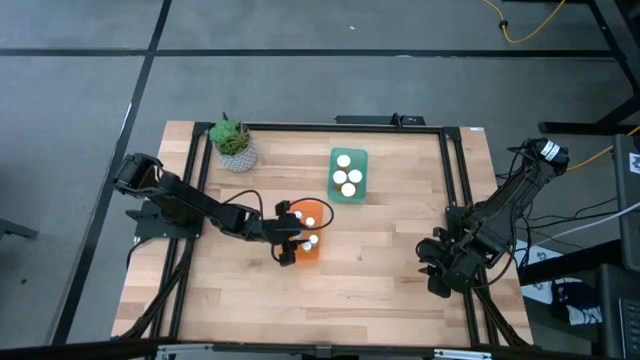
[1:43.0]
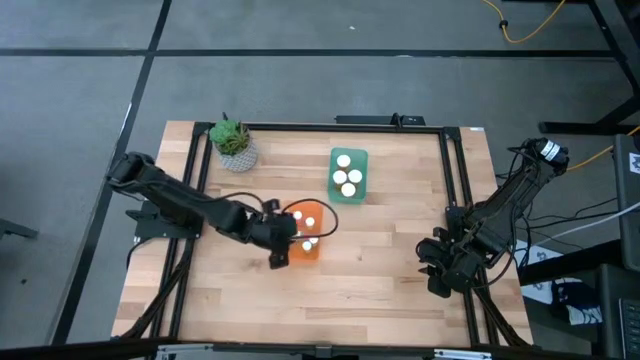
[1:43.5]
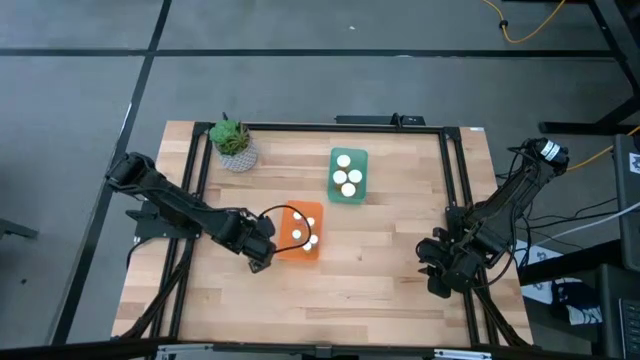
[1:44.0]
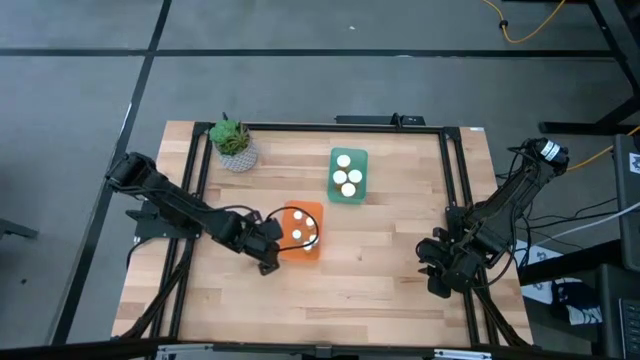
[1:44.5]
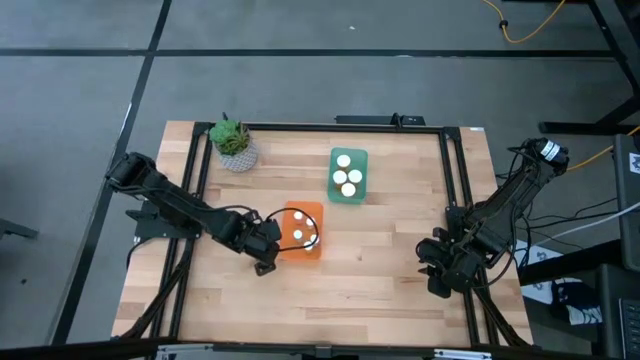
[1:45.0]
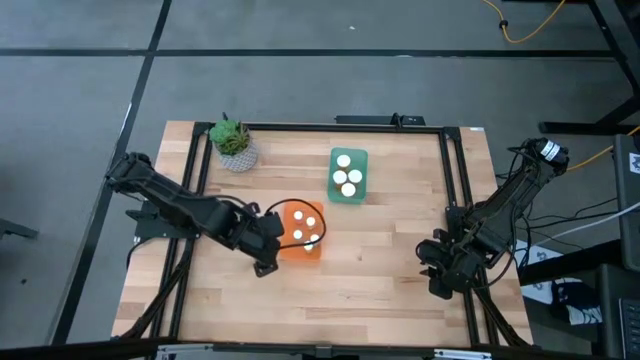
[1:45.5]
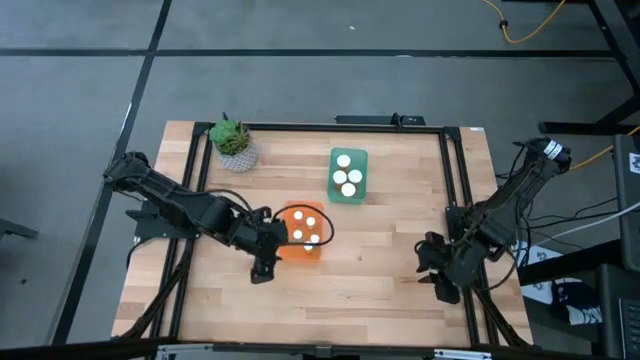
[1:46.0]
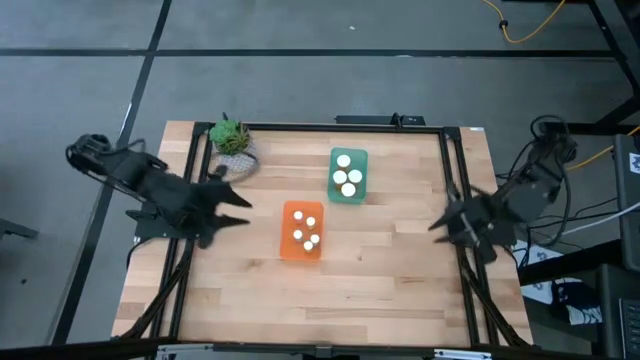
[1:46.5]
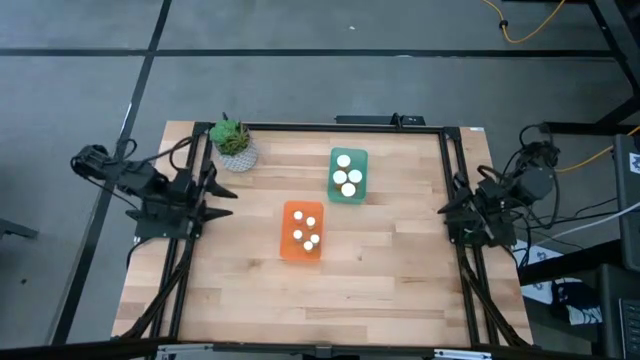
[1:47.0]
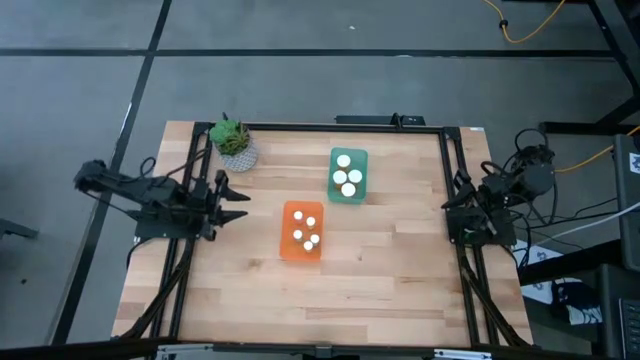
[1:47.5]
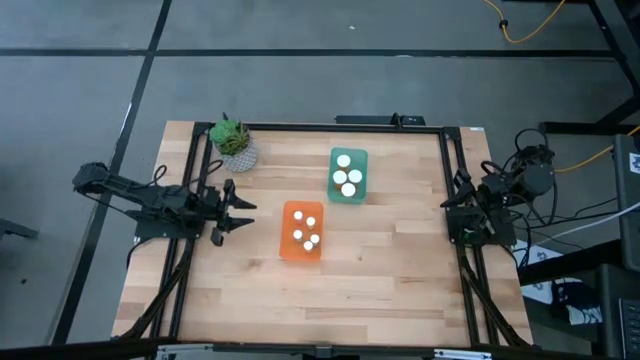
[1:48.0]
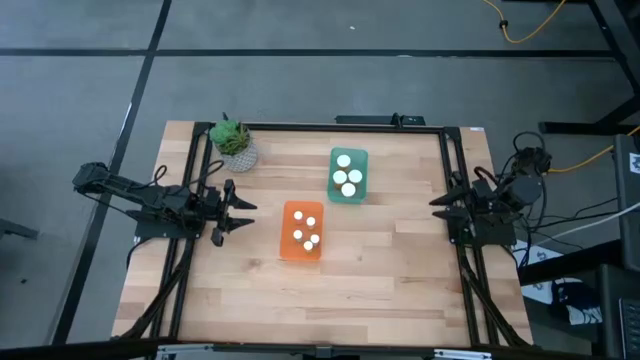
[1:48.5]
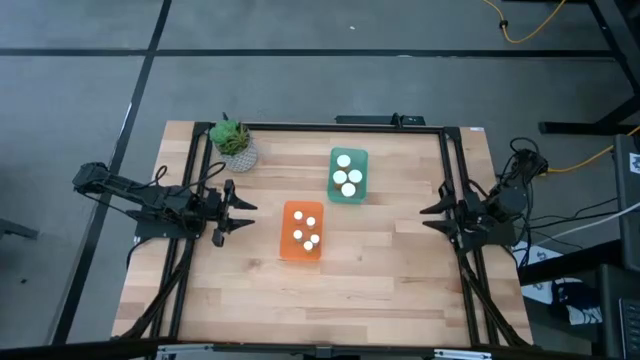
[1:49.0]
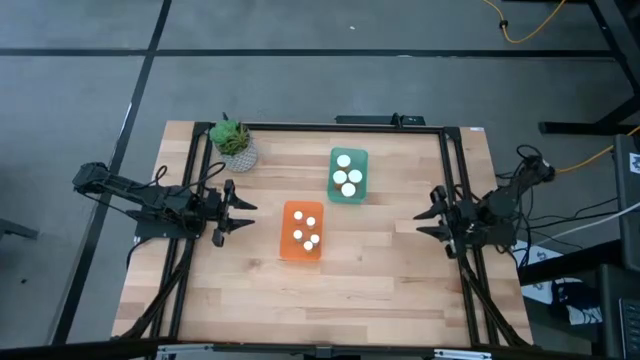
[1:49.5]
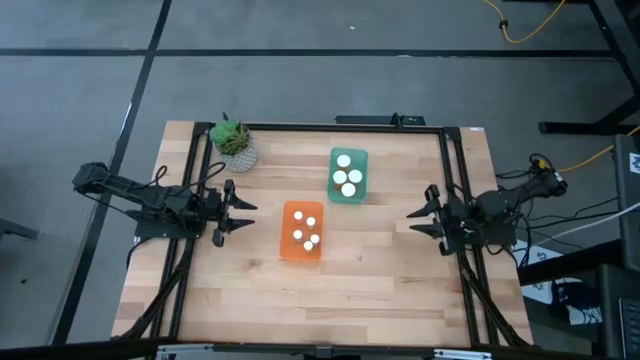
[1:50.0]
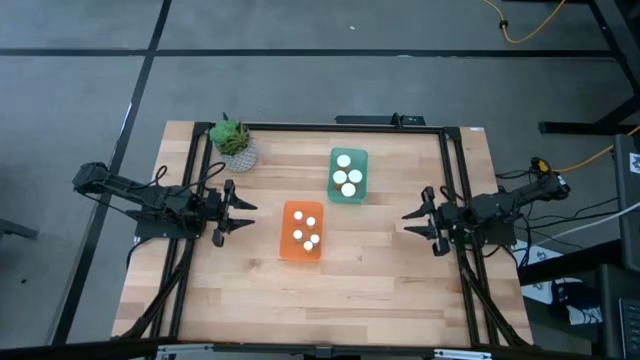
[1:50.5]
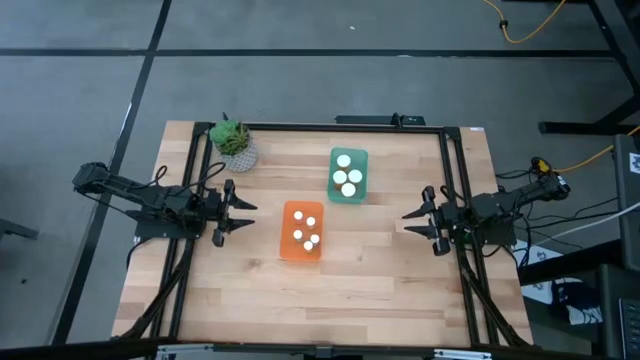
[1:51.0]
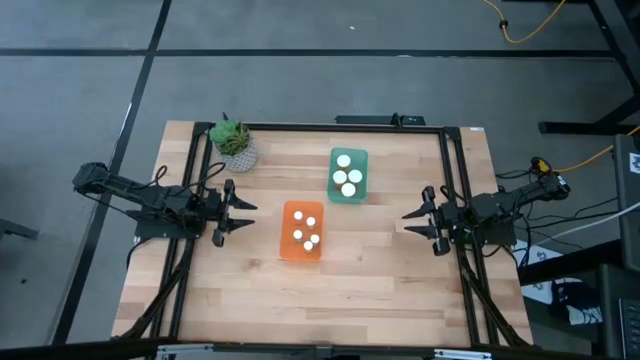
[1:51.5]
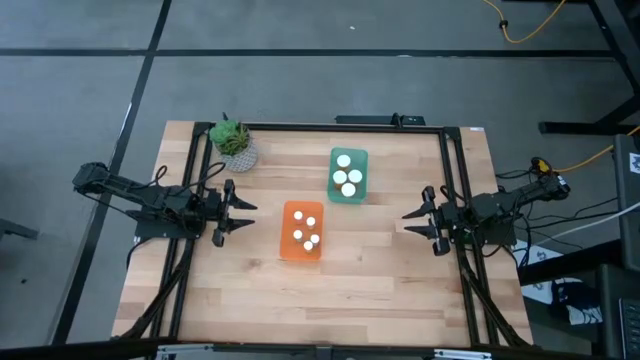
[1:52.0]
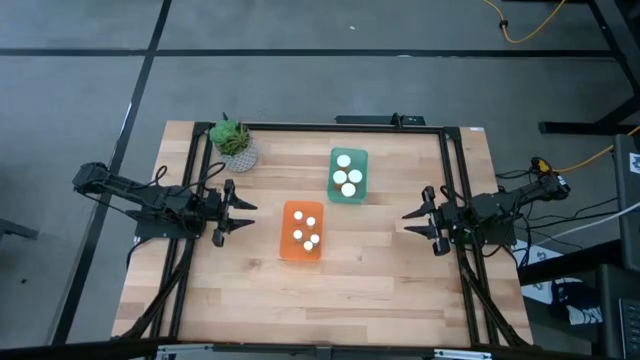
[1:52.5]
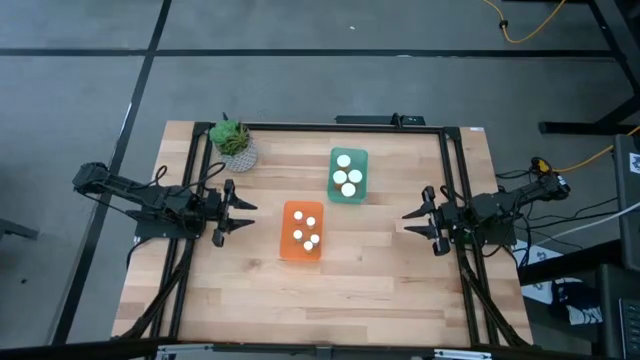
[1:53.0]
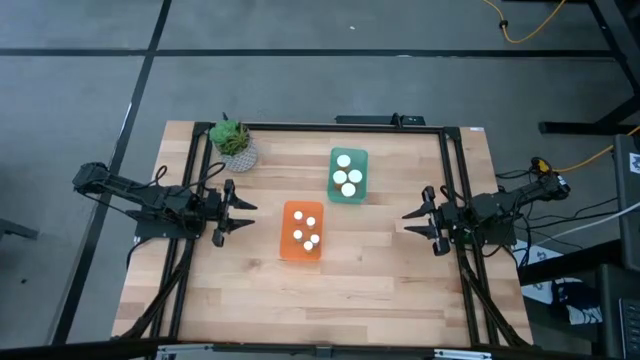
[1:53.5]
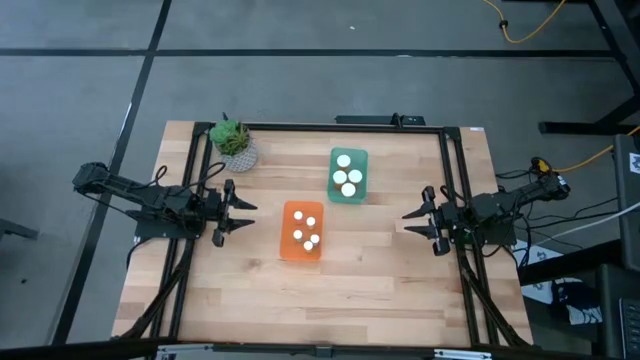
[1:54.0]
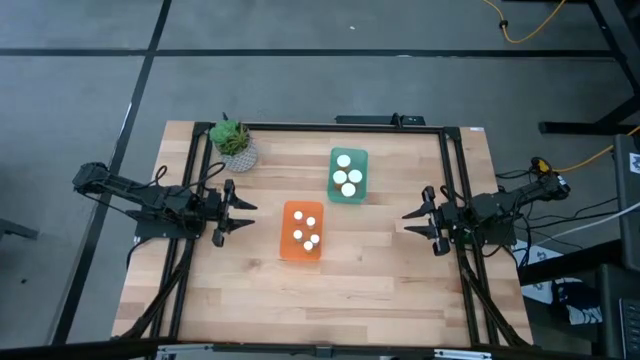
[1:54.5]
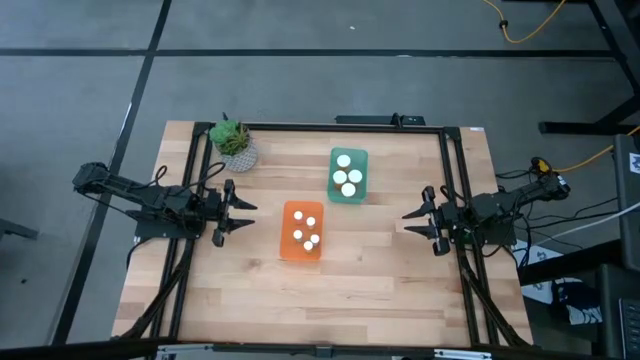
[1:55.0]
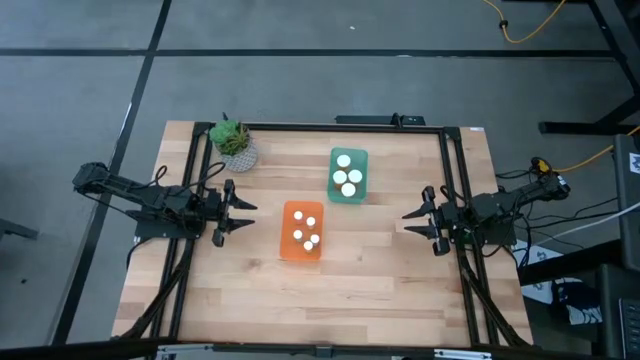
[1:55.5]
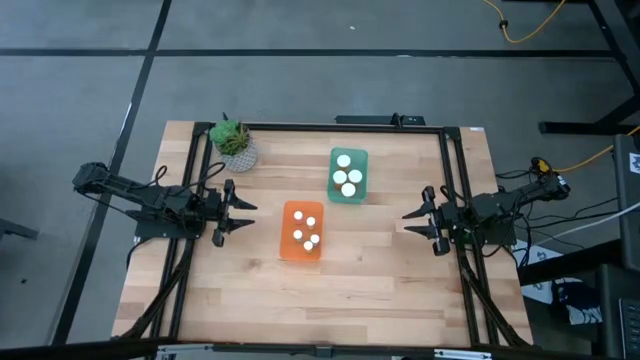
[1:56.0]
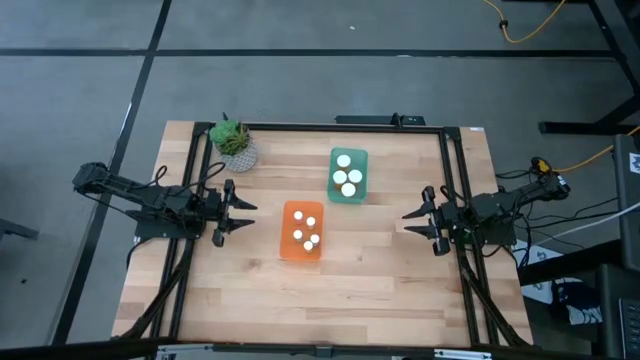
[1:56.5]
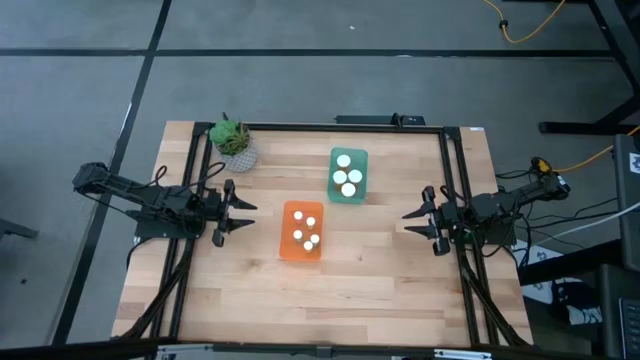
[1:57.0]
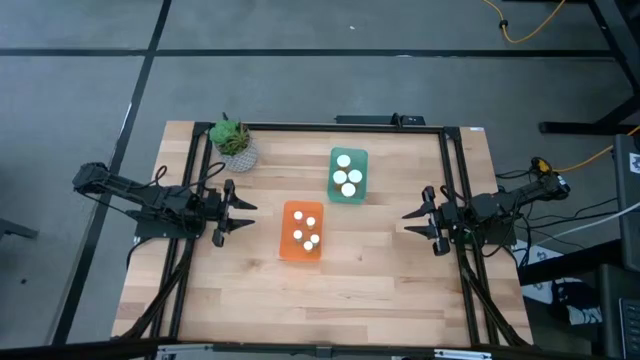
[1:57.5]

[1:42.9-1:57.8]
Task: Pick and place medicine bottles into bin by pill shape (circle, oval)
Return to Home Position

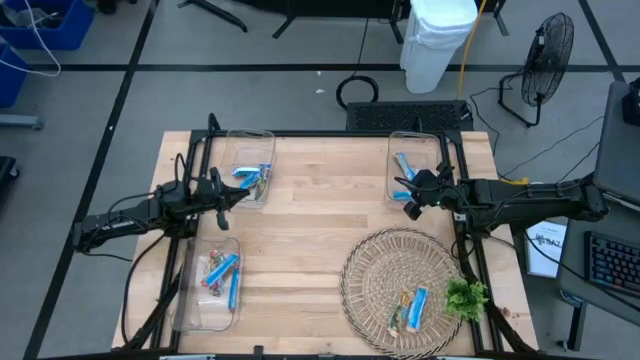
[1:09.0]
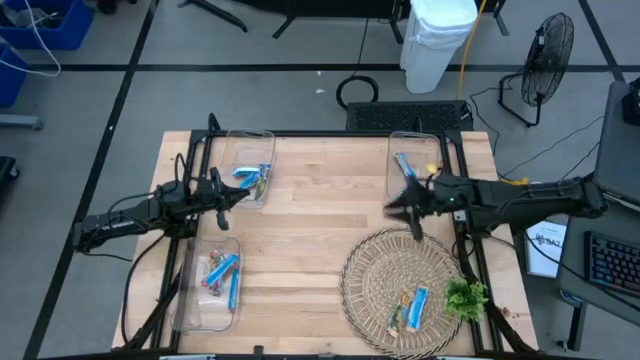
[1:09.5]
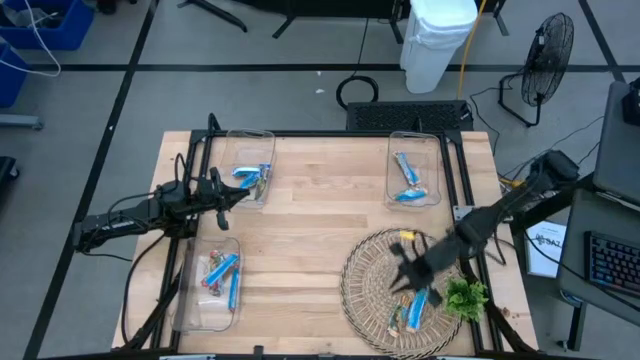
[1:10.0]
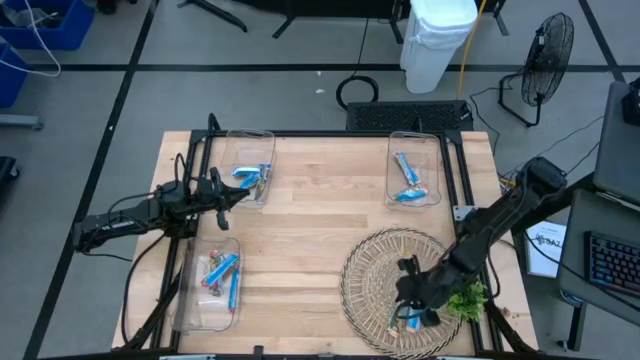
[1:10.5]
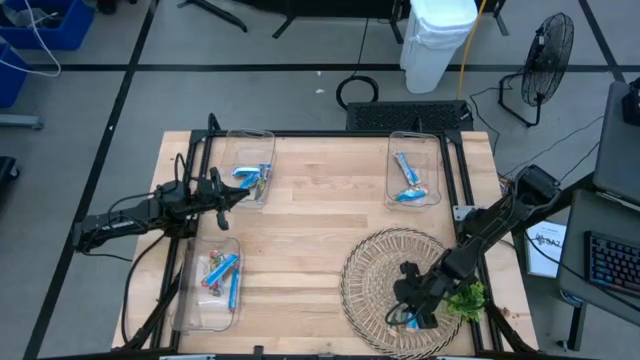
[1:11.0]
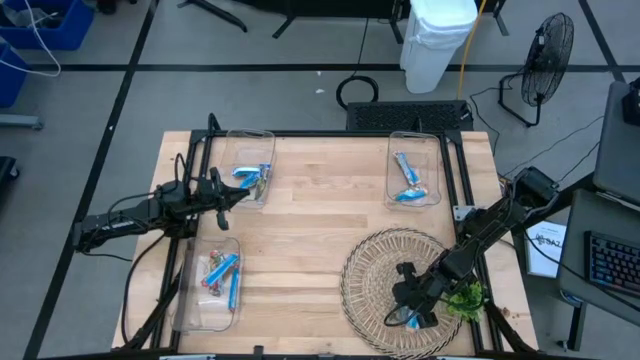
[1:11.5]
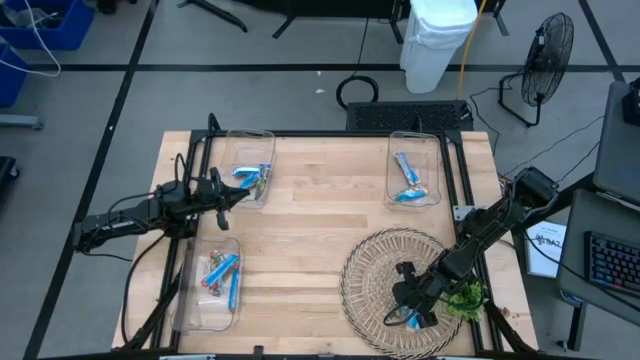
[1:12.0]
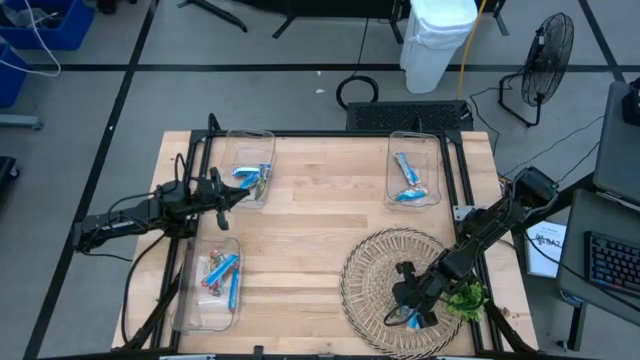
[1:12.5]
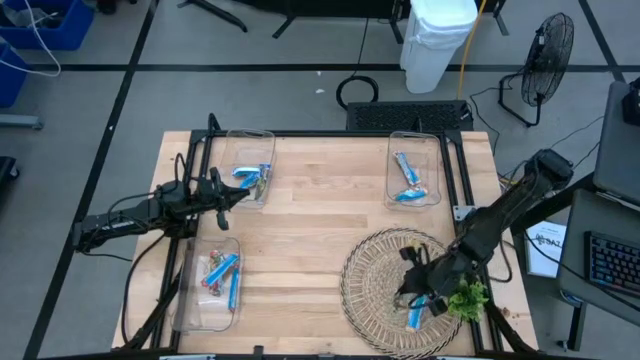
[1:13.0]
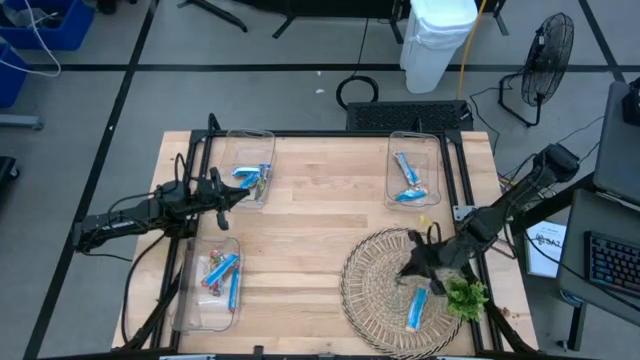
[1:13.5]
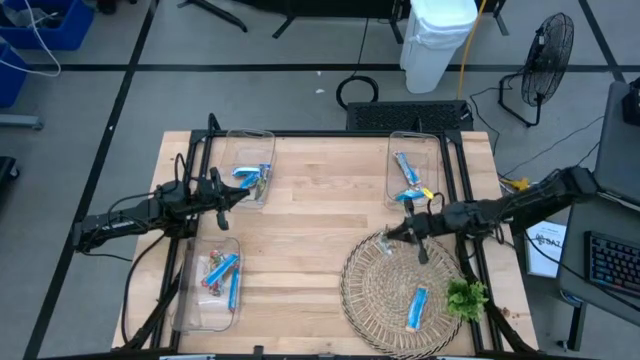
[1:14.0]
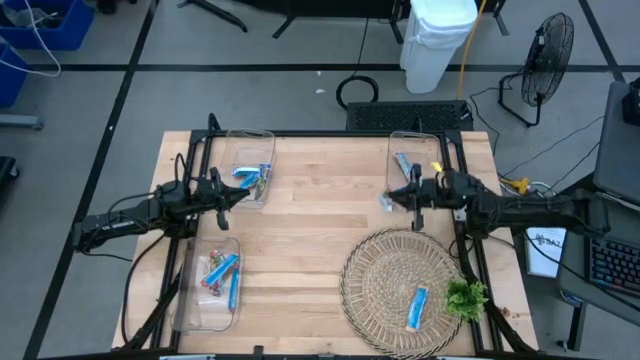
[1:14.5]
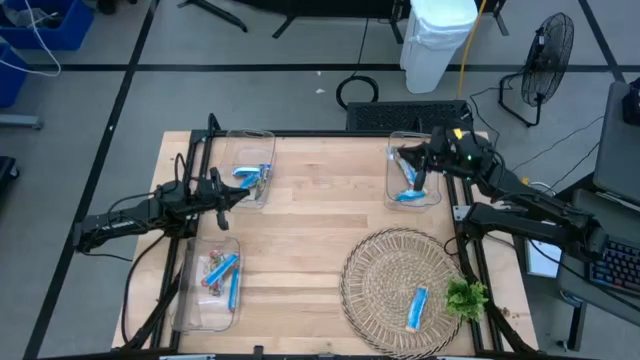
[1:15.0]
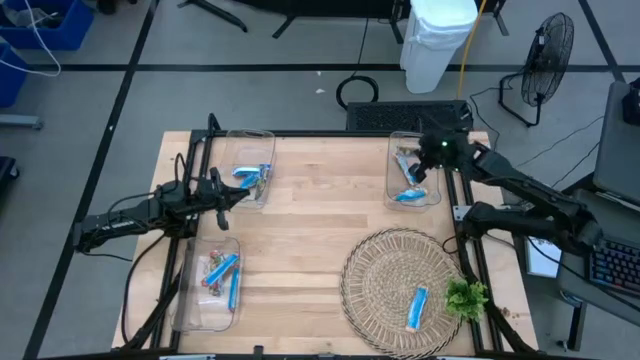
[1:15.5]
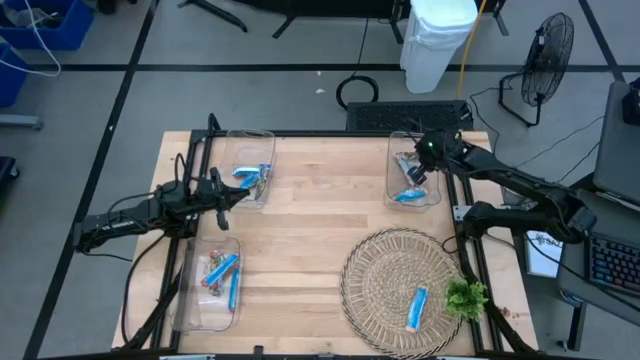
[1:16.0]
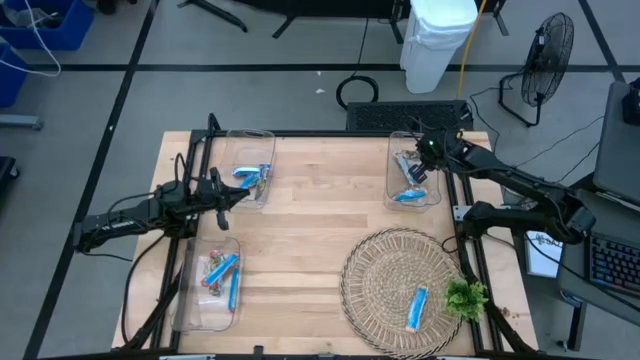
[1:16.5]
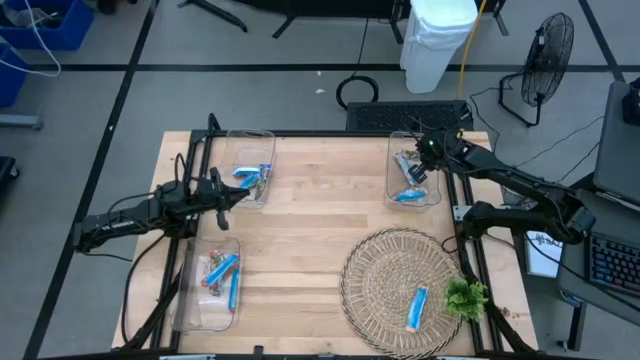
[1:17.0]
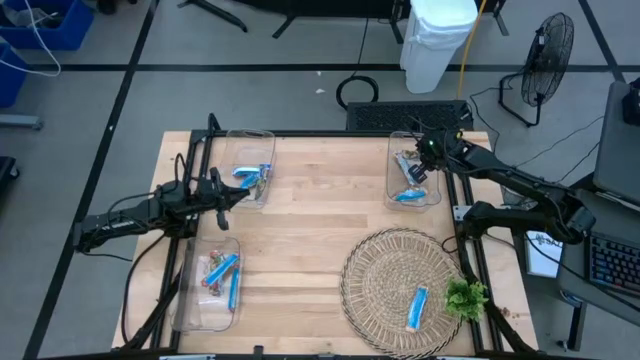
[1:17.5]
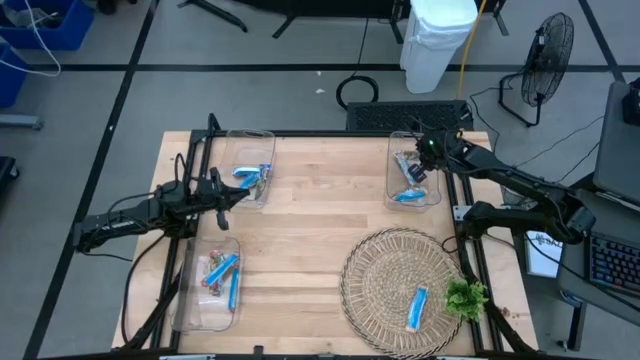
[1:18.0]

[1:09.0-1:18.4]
Task: Pick and place Granola Bars by type
Put the yellow granola bar into the top right transparent bin
